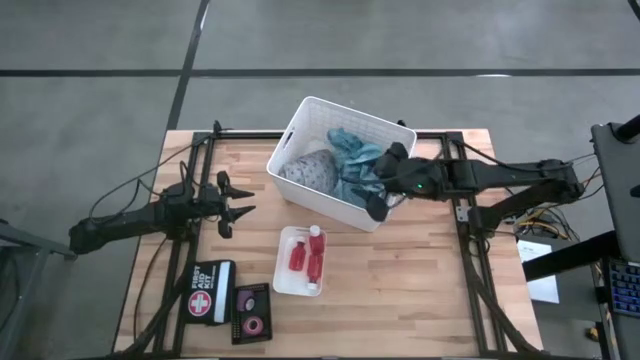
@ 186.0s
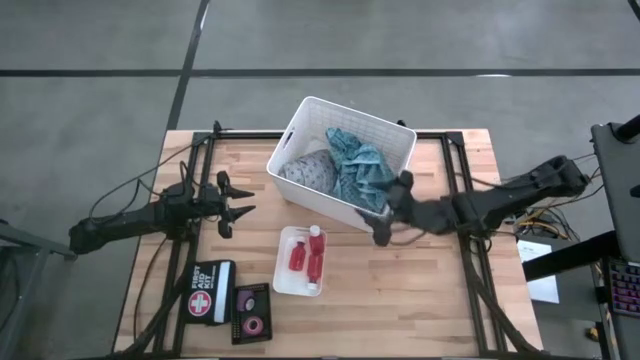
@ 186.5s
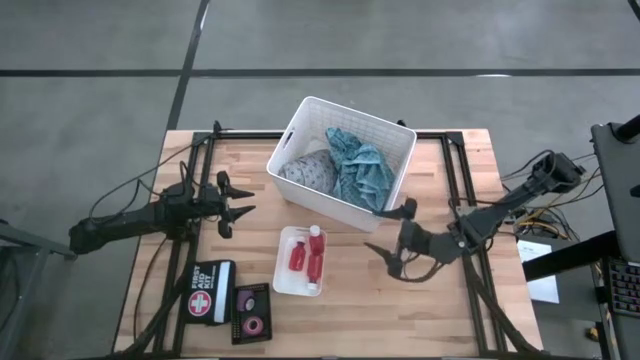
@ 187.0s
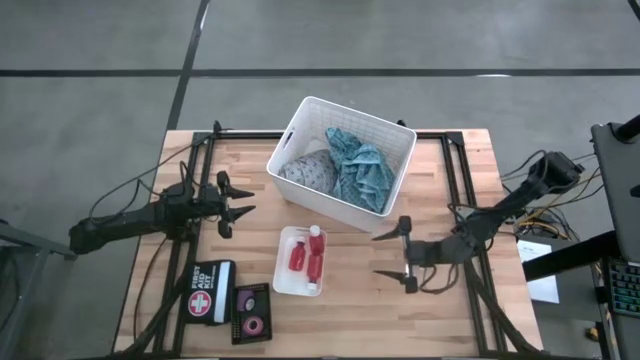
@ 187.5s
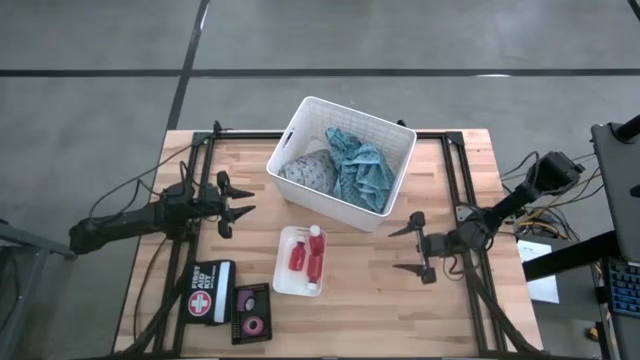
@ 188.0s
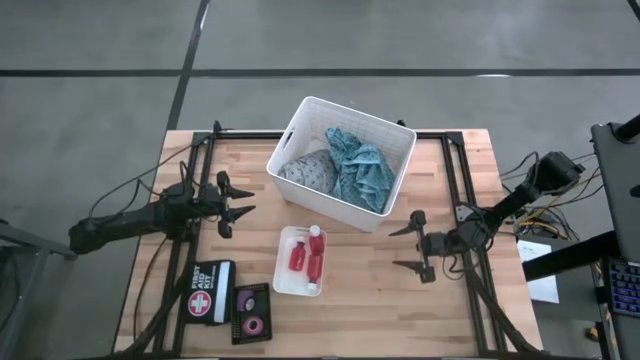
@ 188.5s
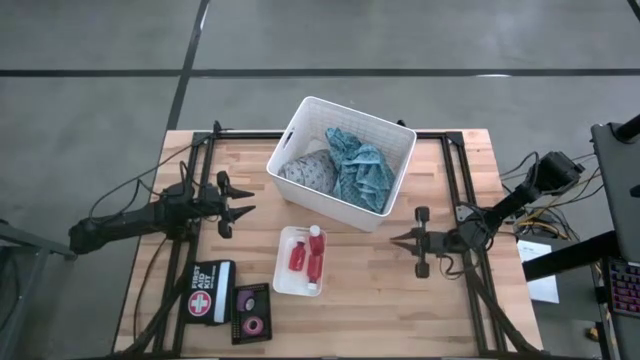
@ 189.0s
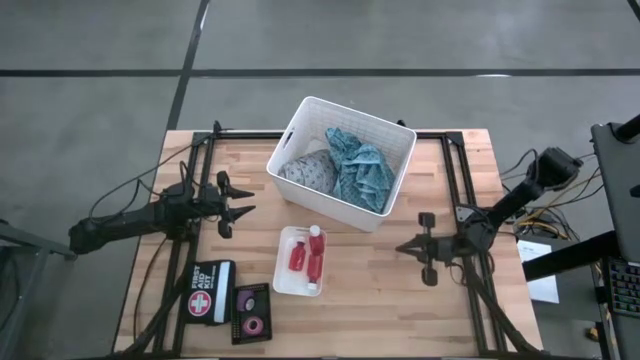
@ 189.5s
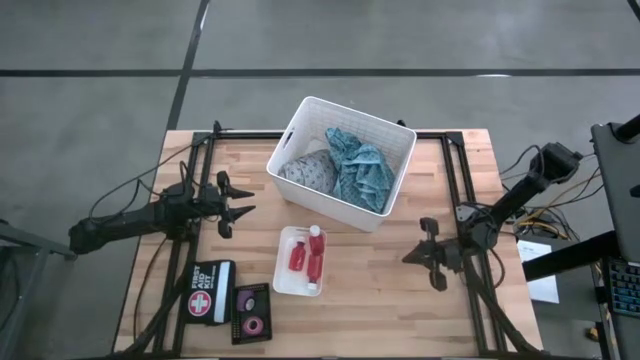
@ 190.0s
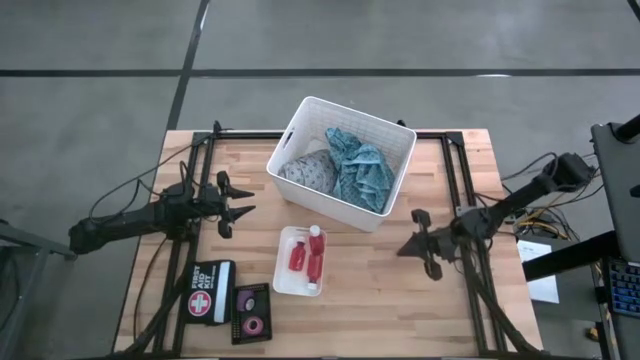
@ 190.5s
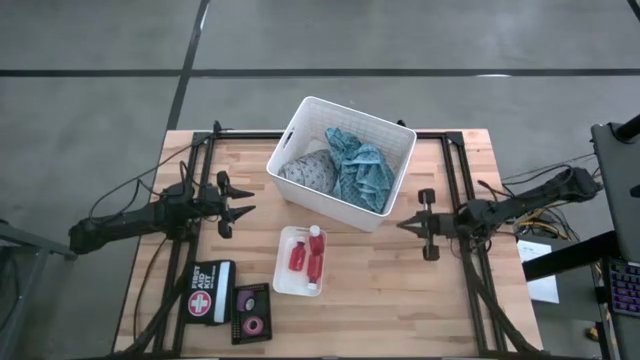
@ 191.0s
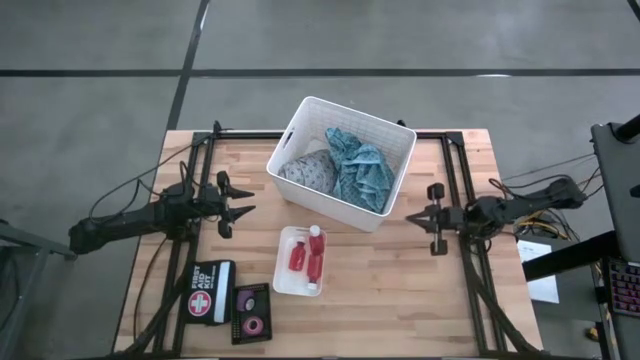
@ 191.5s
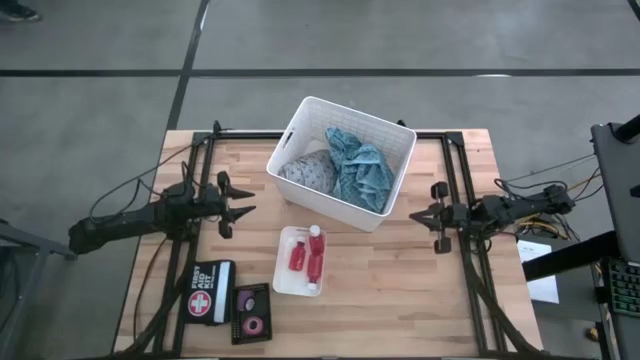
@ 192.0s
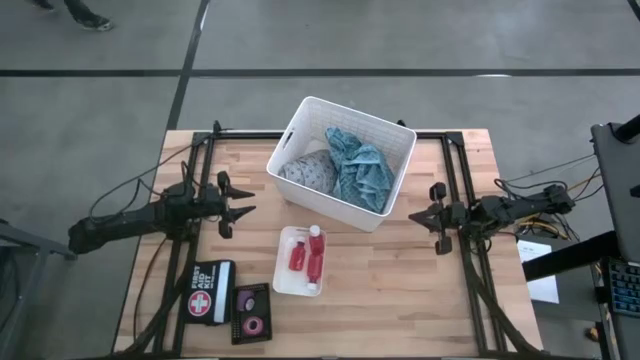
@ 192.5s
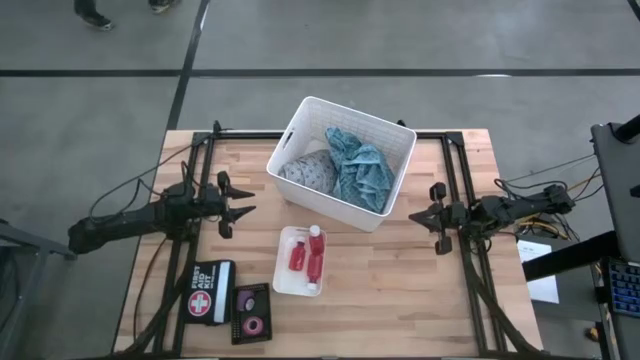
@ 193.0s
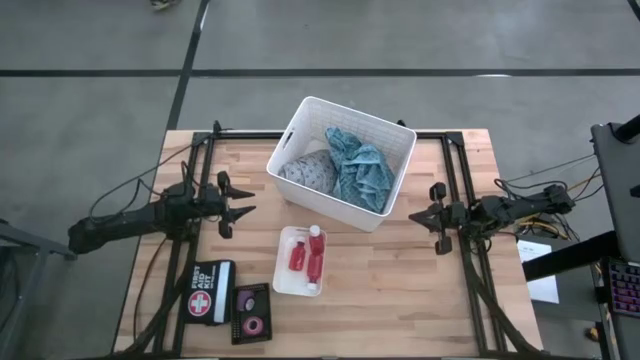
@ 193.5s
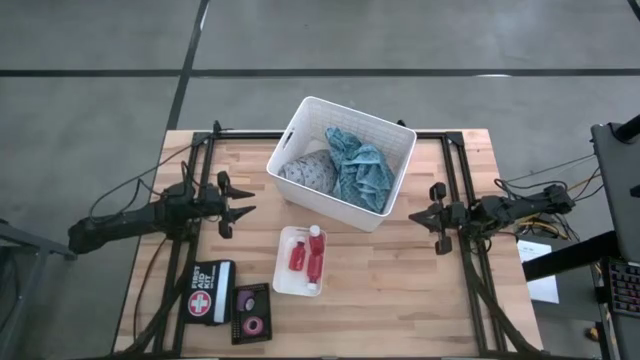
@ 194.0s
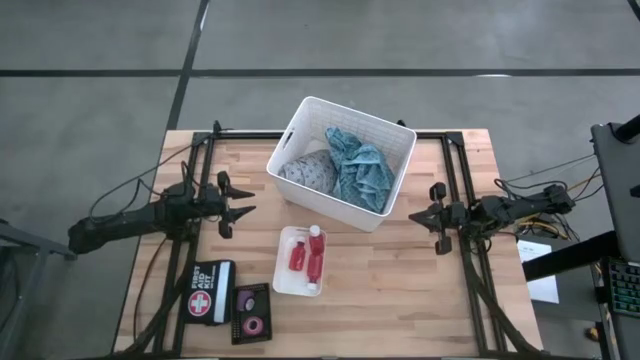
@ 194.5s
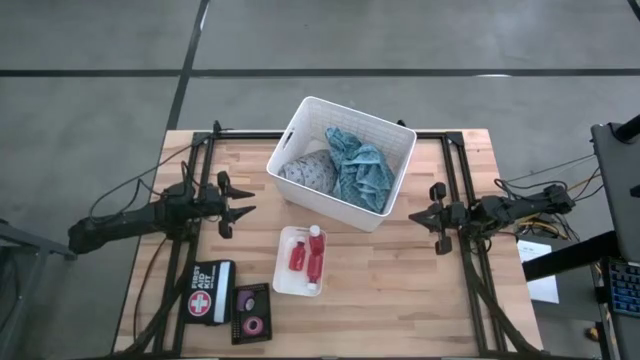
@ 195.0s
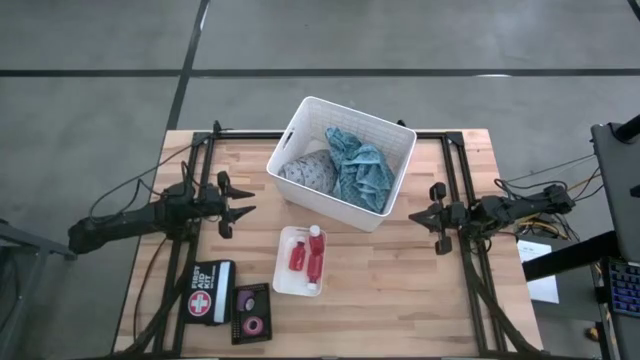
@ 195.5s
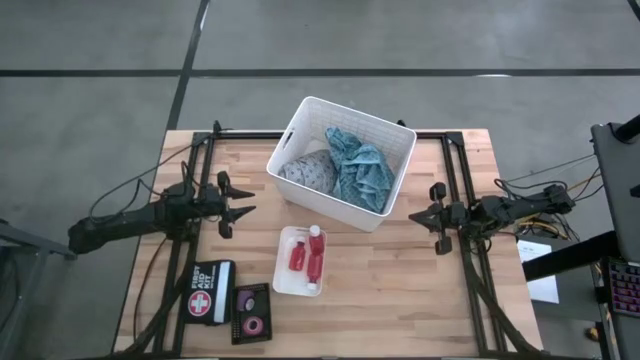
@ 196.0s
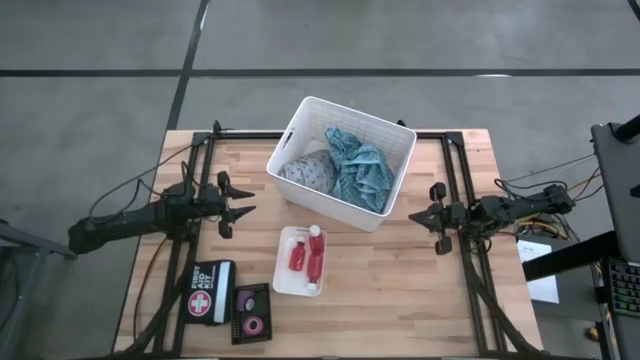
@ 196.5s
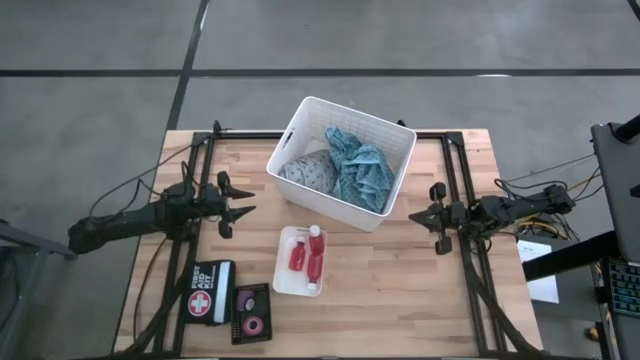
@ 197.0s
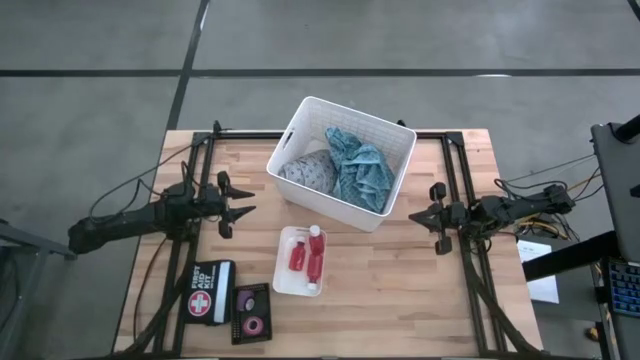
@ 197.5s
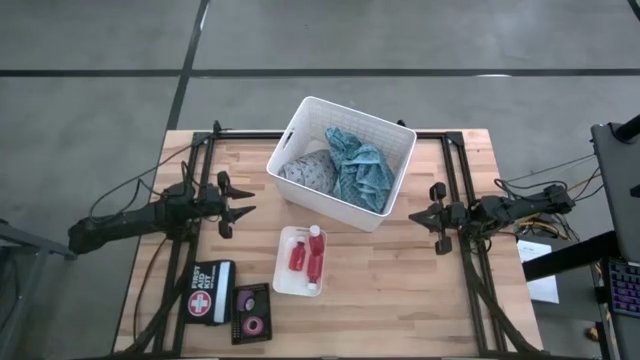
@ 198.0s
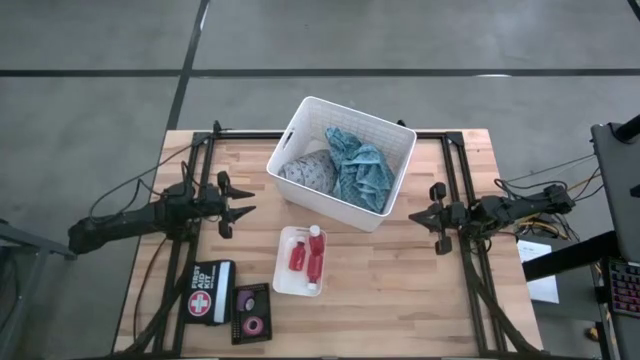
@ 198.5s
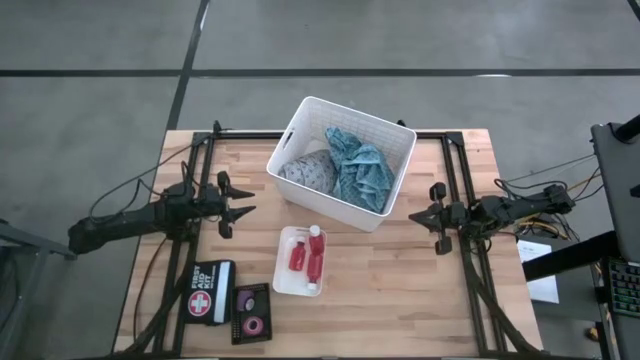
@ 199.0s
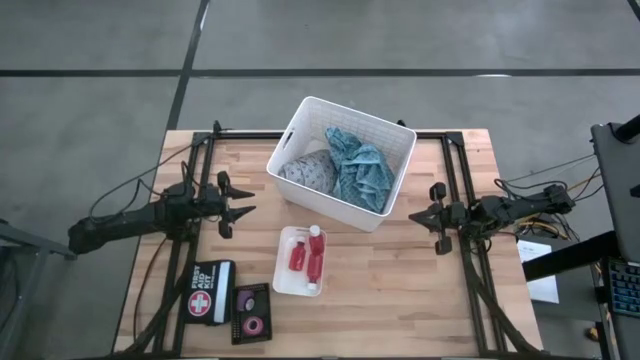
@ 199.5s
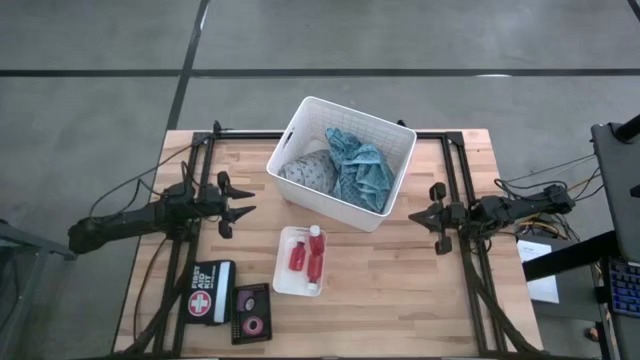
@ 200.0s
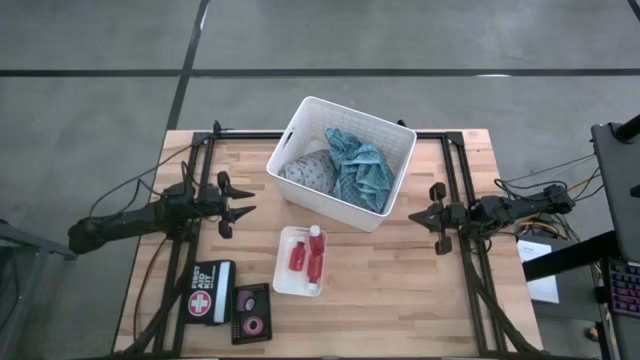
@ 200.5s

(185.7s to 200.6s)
Task: Pick & Place Medicine items
Return to Home Position

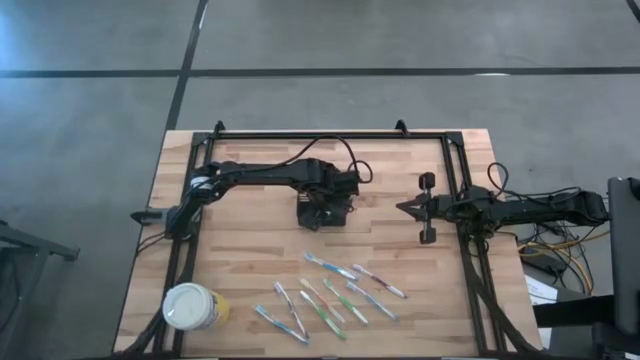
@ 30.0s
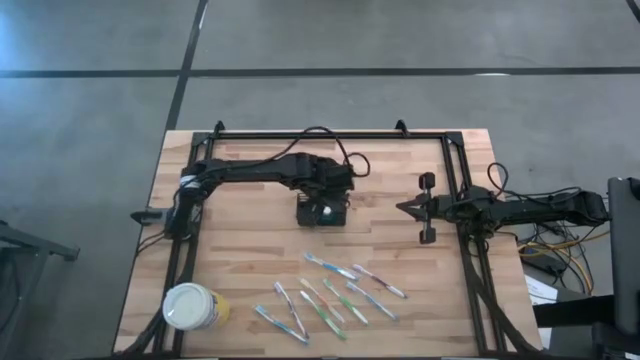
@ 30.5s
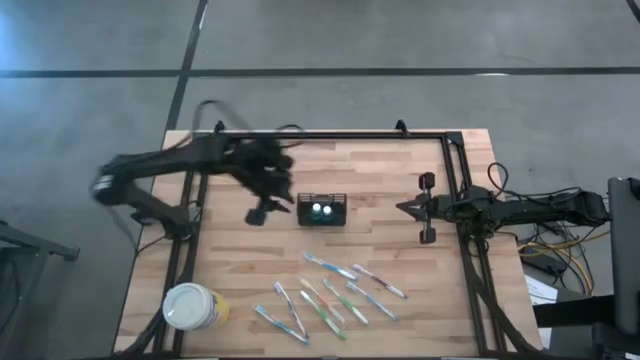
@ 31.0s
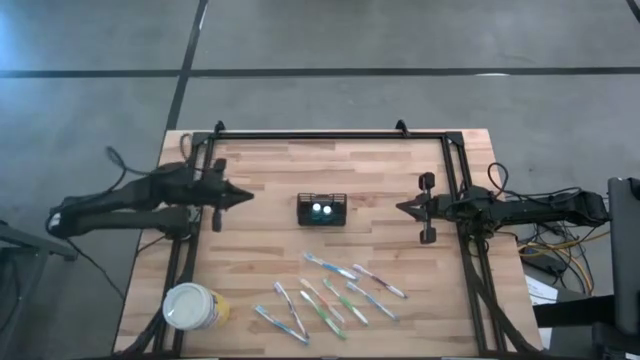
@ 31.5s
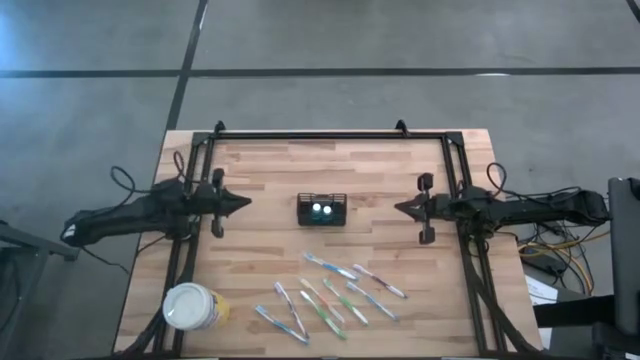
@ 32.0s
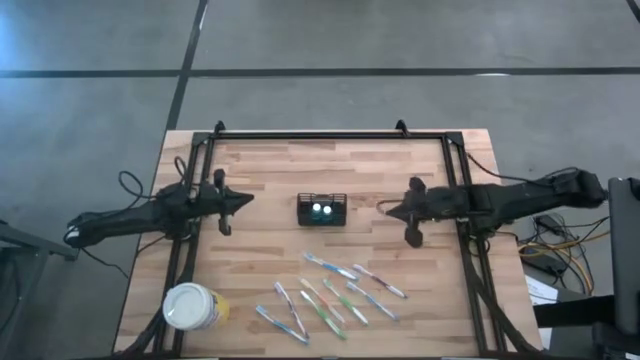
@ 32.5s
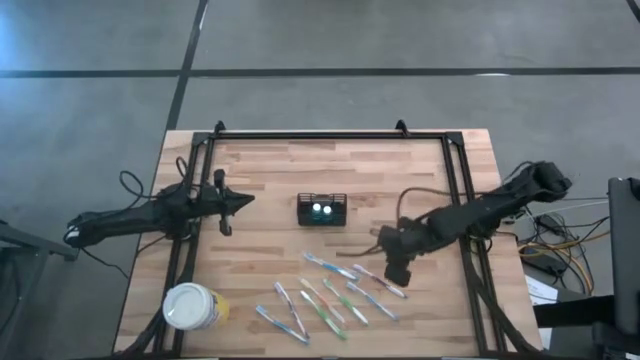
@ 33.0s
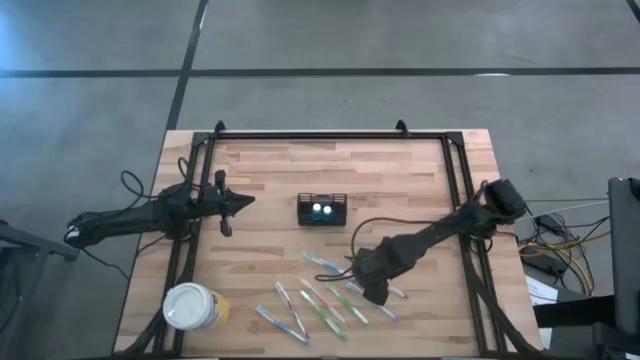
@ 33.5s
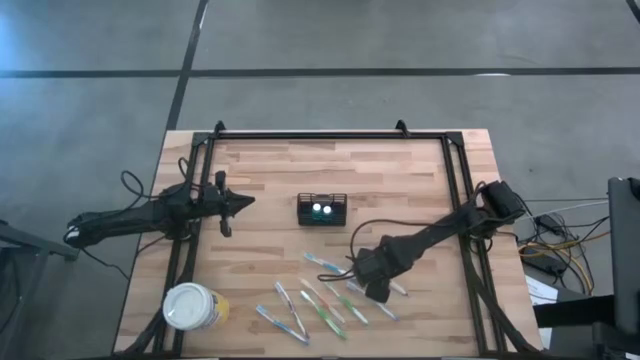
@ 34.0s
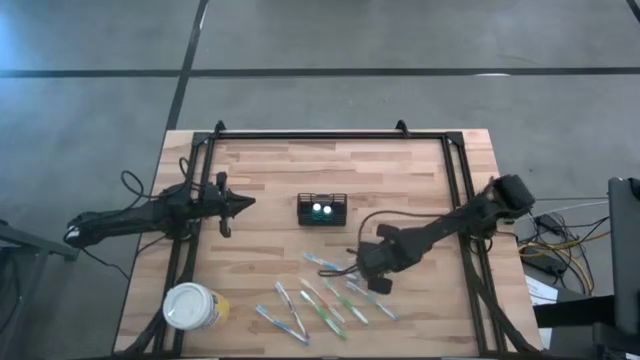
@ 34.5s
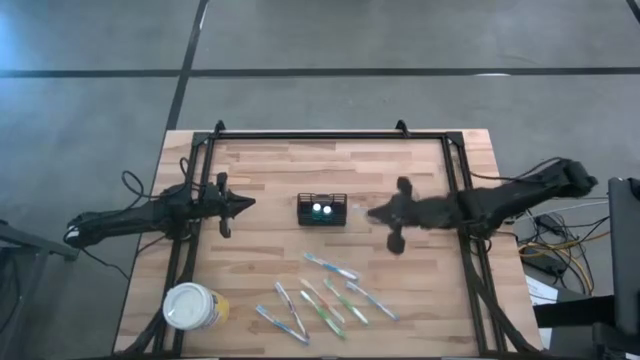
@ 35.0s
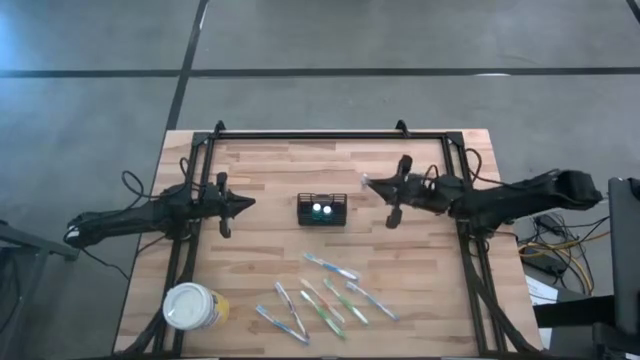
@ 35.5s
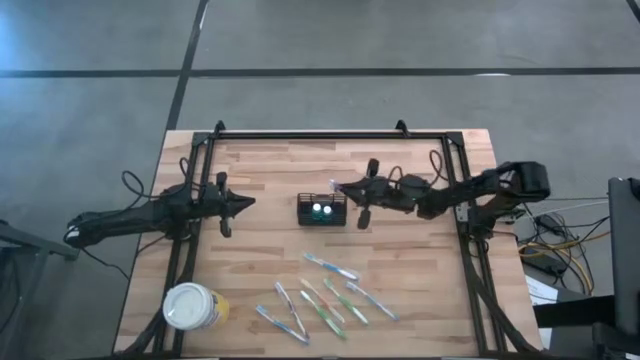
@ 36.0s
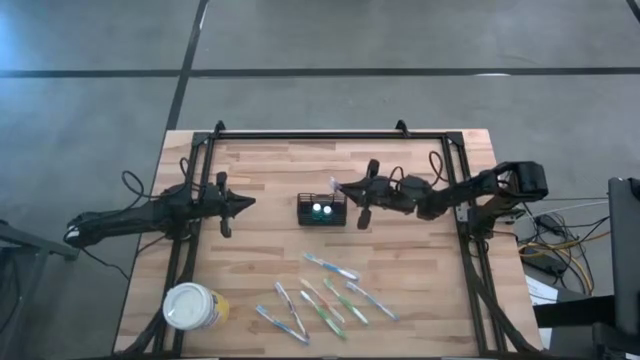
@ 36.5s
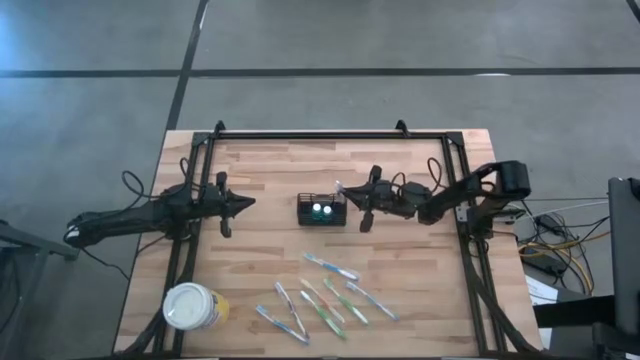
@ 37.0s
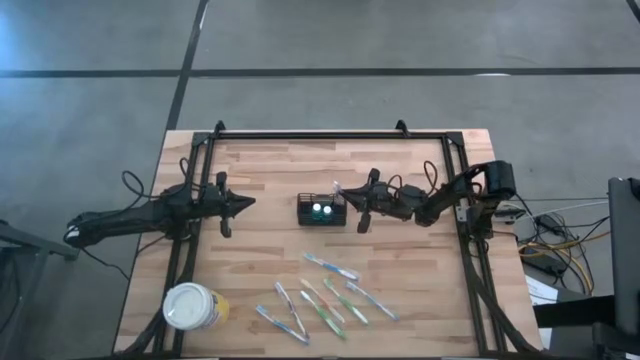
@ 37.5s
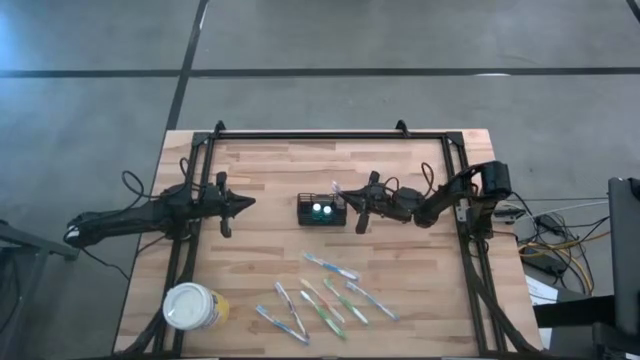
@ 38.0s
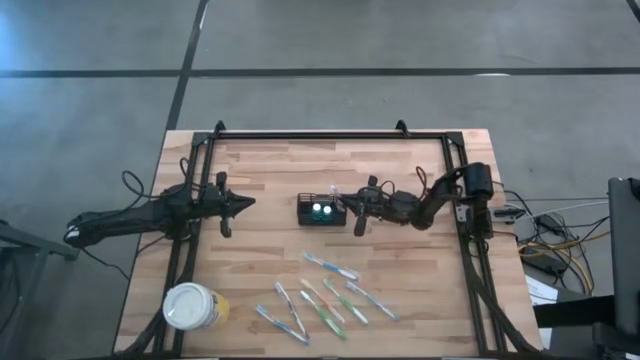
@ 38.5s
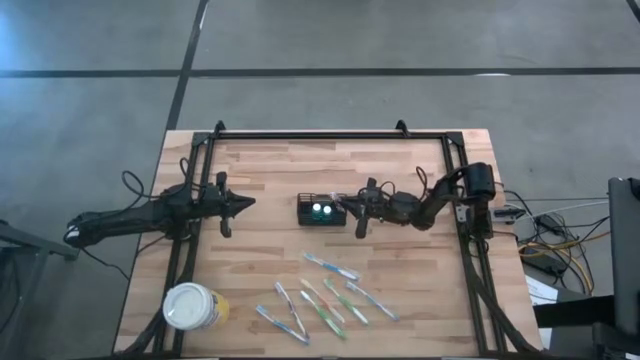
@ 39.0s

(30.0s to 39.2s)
Task: Pick & Place toothbrushing station
Put the violet toothbrush into the black wire organizer
